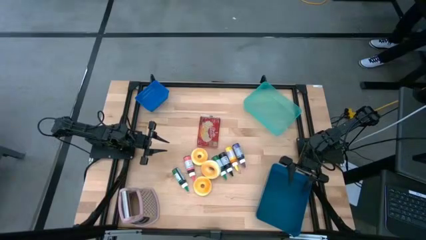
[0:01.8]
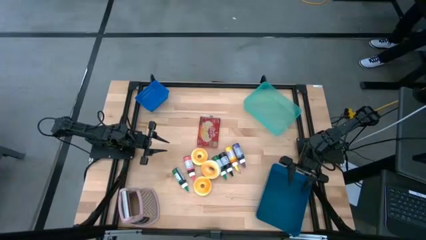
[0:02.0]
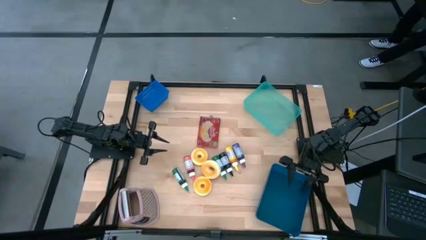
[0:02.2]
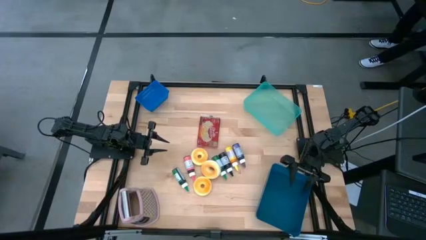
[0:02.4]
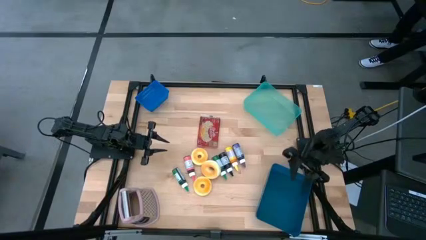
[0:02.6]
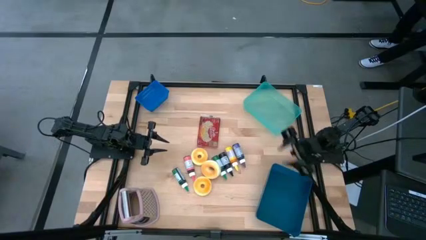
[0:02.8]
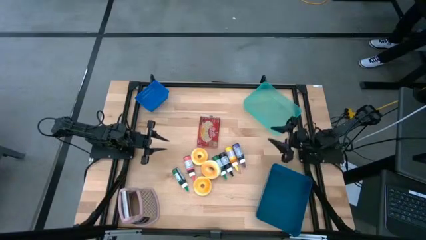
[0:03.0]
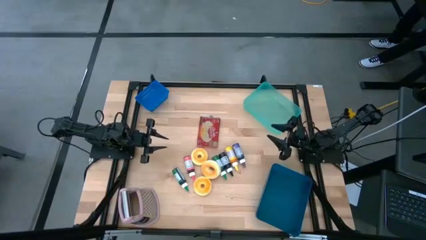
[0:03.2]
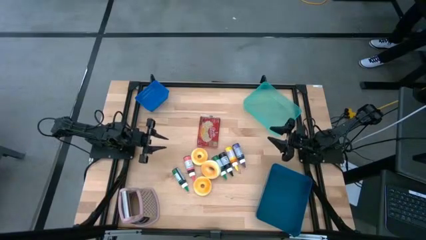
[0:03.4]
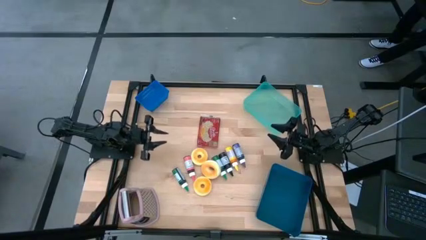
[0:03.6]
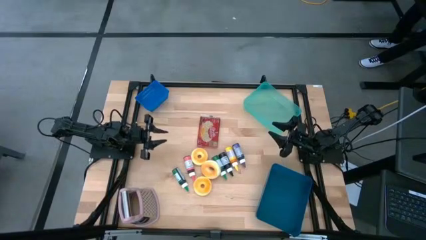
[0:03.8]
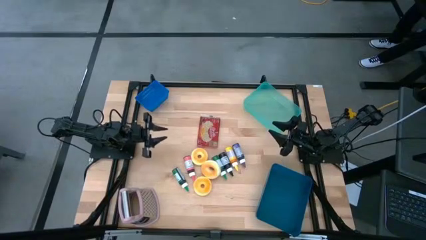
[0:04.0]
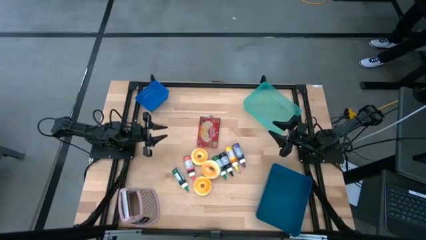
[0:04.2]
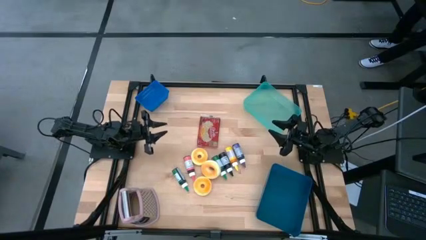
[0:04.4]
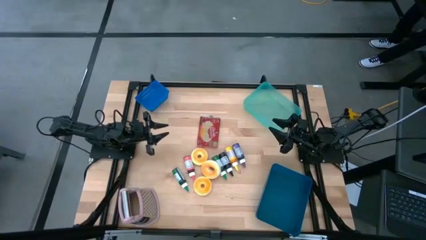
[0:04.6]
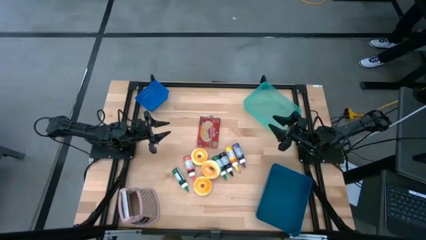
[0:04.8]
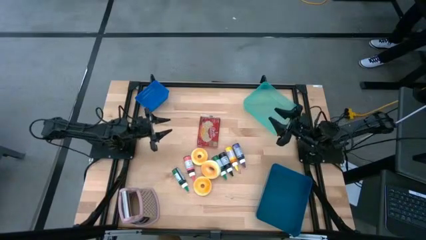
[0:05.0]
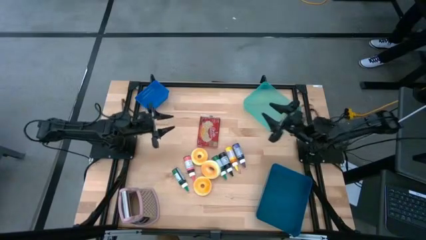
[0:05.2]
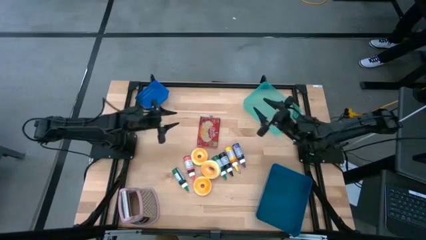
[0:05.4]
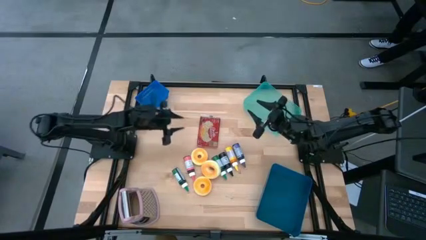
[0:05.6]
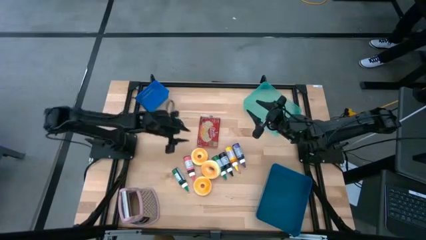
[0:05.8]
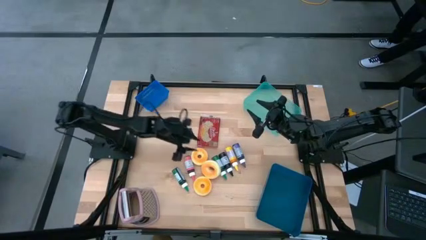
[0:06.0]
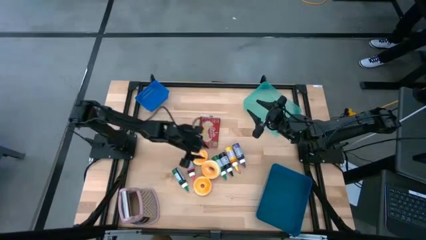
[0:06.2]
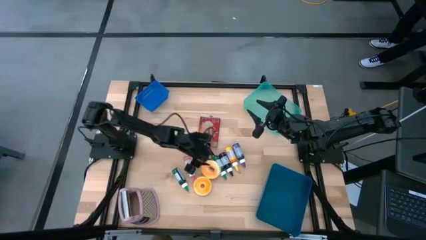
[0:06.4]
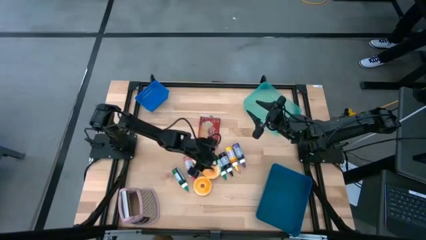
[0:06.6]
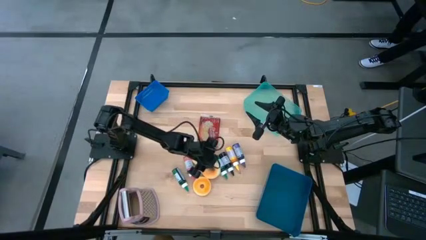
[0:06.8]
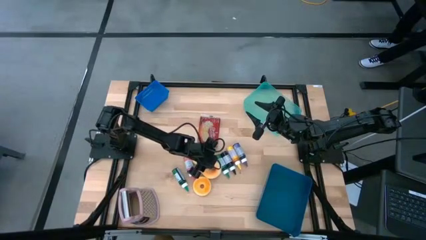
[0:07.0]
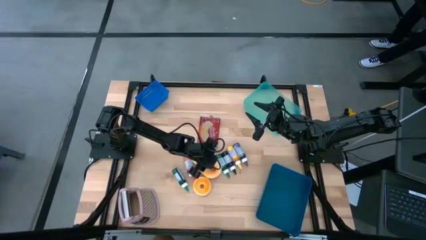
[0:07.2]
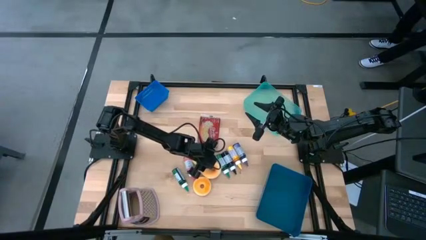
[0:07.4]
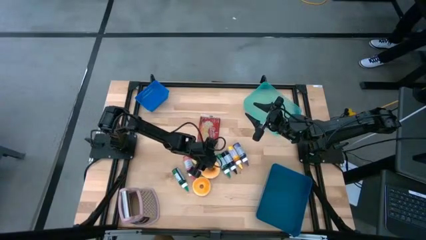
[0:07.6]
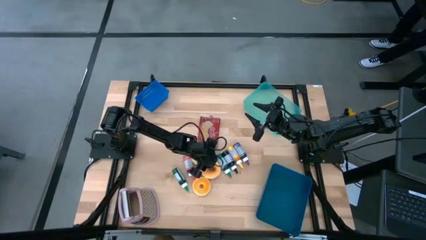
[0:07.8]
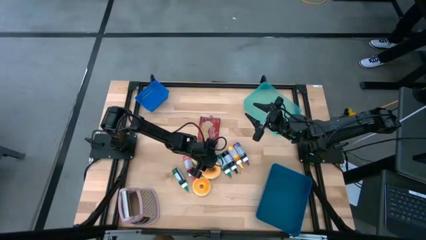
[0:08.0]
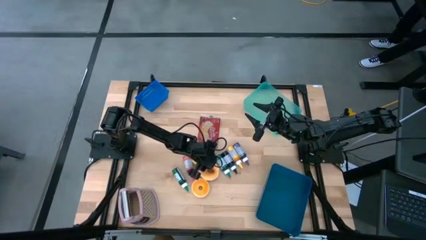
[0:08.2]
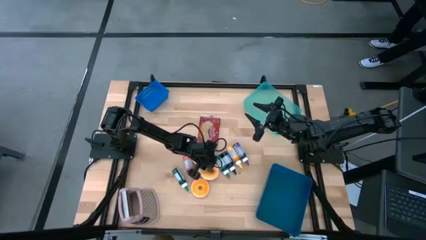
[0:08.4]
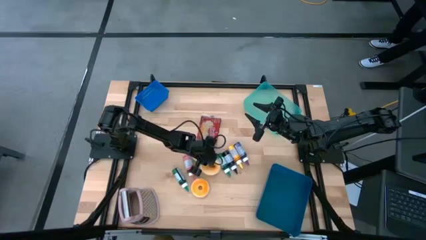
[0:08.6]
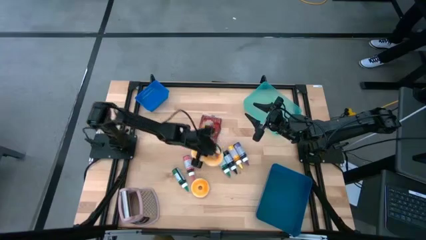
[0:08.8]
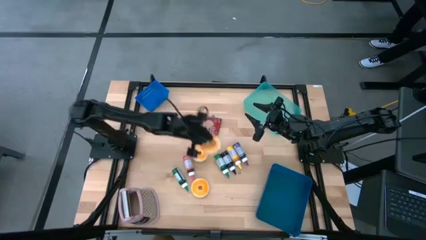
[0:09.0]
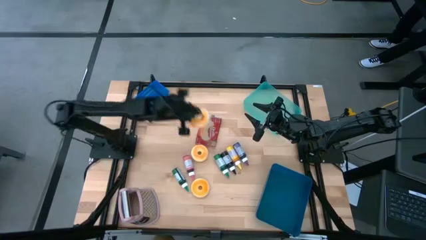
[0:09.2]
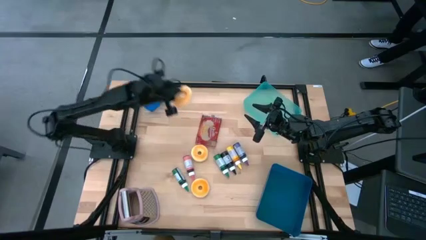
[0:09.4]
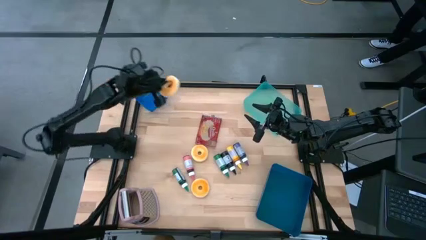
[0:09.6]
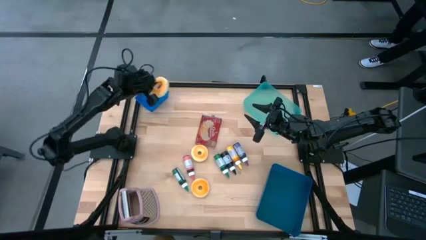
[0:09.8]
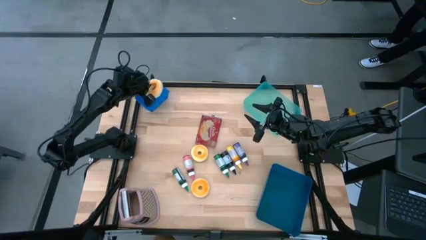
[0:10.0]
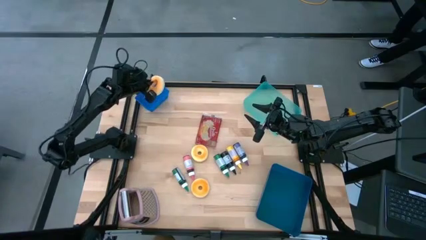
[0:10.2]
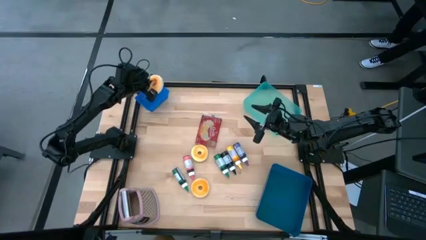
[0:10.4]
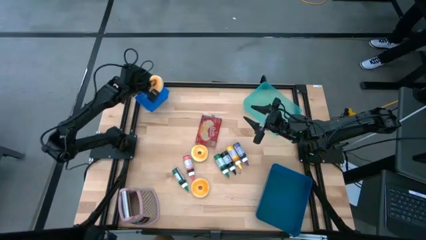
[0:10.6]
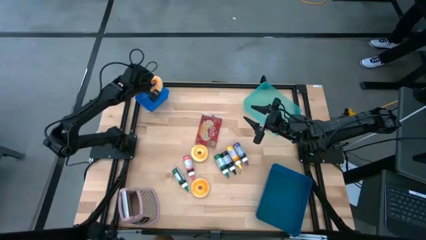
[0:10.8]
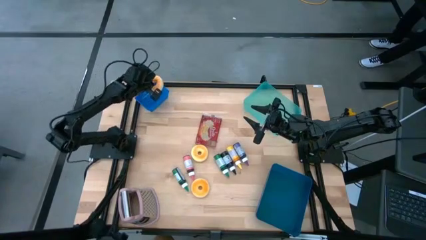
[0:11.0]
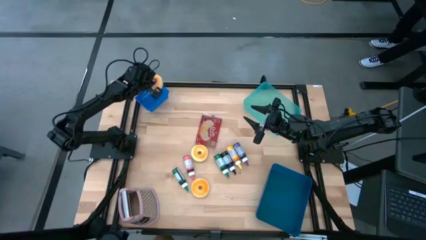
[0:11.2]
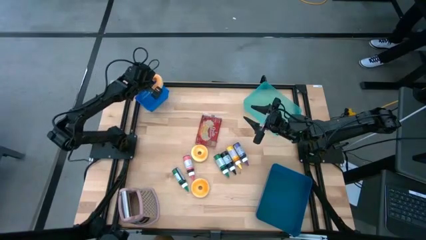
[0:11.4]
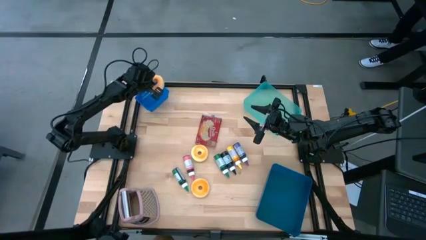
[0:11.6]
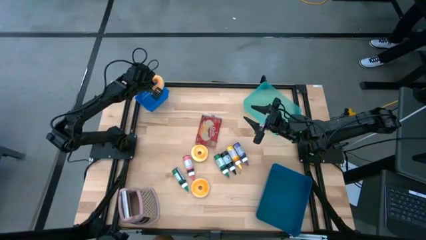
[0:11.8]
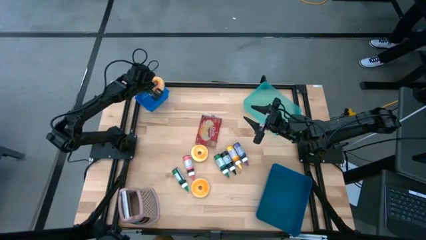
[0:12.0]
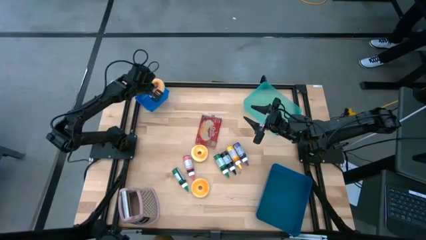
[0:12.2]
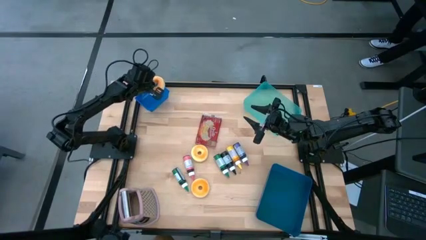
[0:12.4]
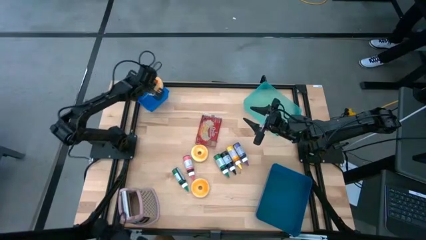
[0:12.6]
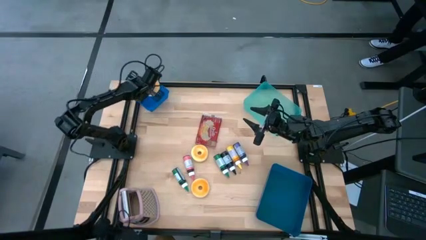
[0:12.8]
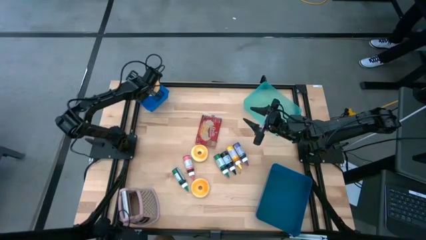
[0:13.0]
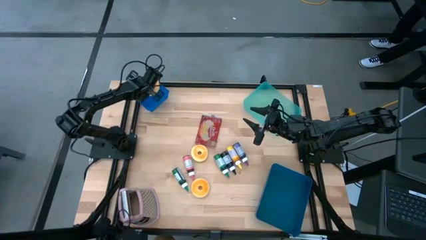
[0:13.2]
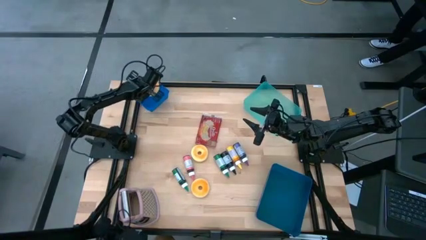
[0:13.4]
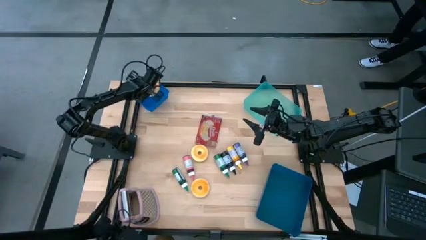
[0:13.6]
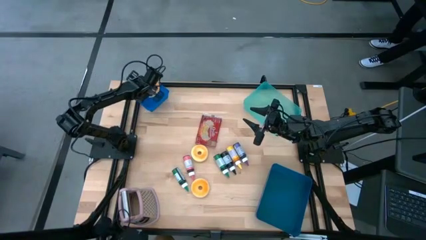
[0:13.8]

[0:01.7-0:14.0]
Put the middle yellow donut into the top blue bin

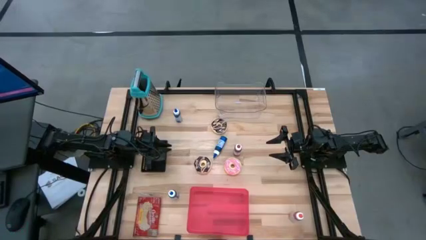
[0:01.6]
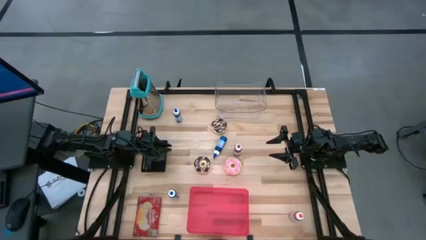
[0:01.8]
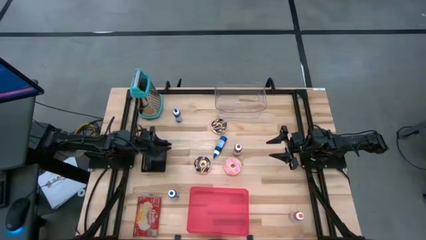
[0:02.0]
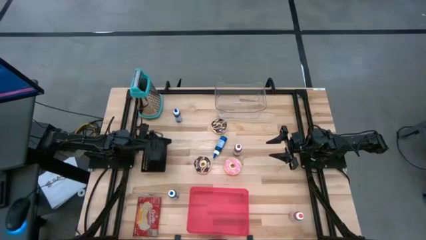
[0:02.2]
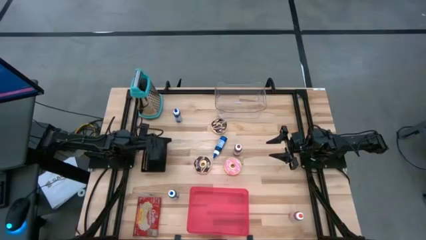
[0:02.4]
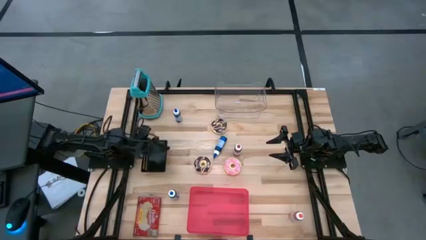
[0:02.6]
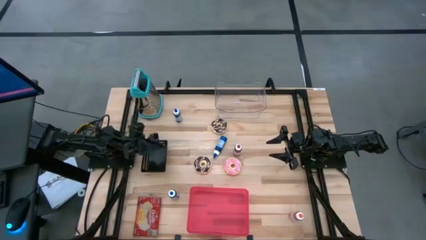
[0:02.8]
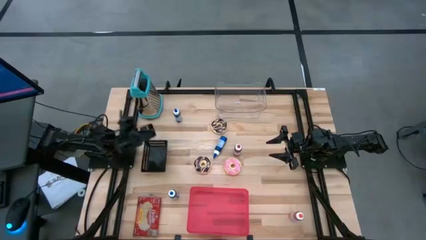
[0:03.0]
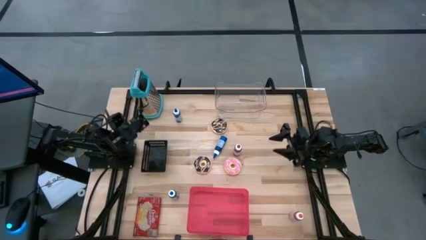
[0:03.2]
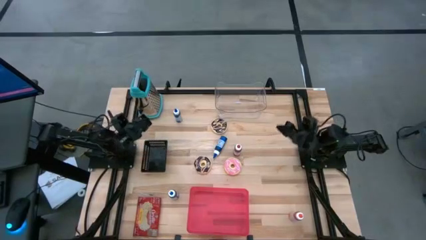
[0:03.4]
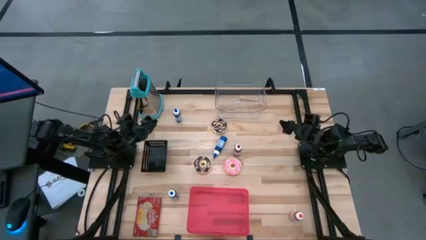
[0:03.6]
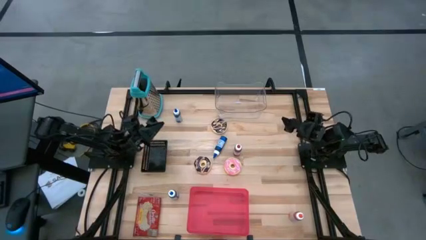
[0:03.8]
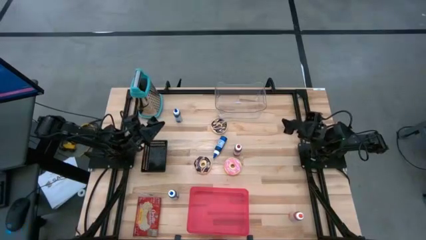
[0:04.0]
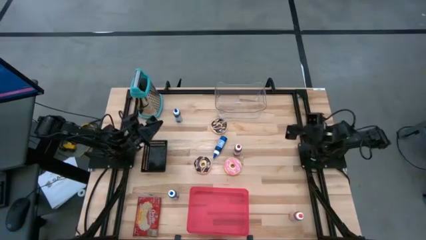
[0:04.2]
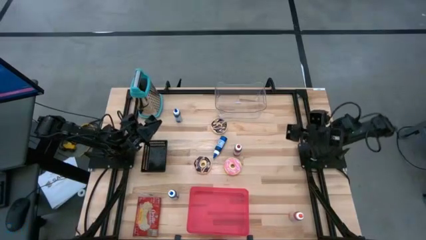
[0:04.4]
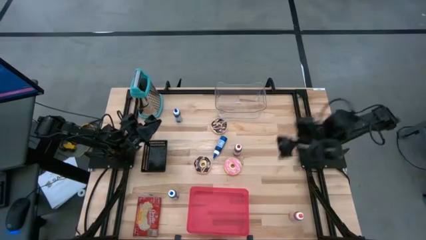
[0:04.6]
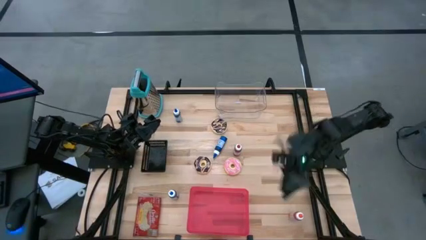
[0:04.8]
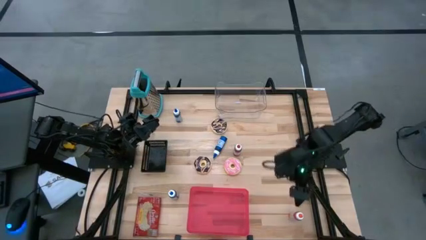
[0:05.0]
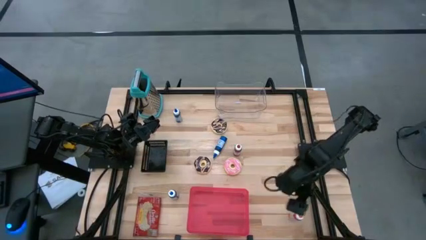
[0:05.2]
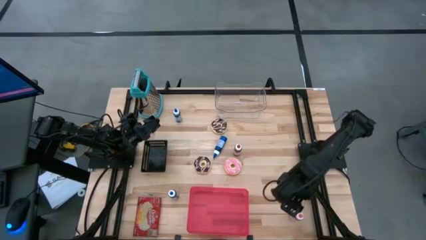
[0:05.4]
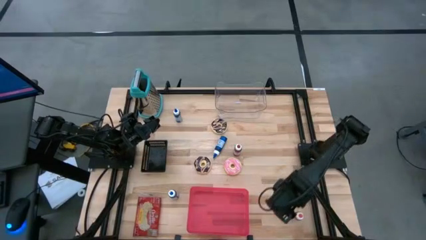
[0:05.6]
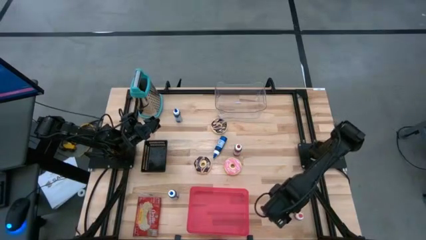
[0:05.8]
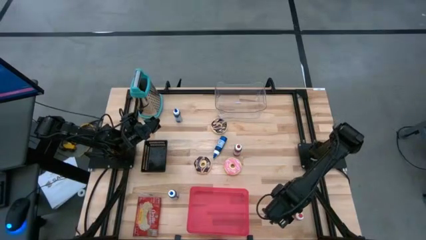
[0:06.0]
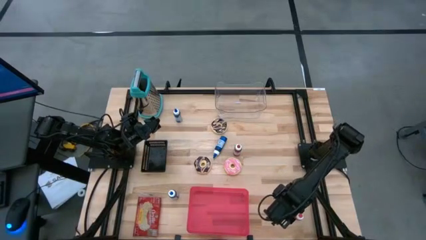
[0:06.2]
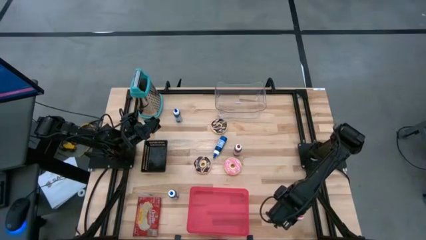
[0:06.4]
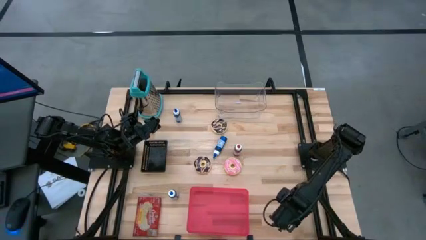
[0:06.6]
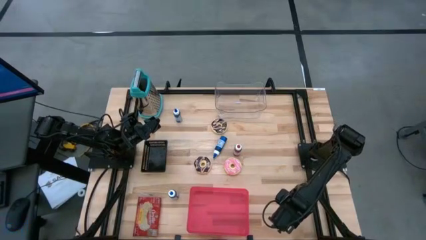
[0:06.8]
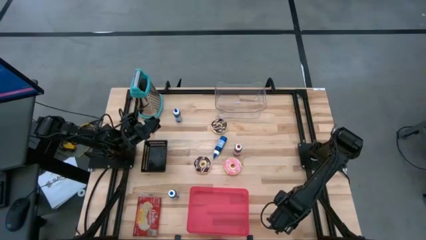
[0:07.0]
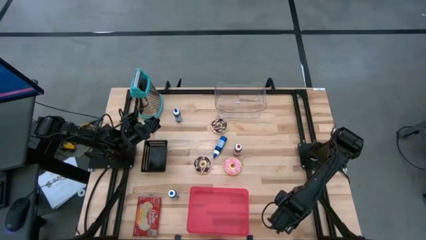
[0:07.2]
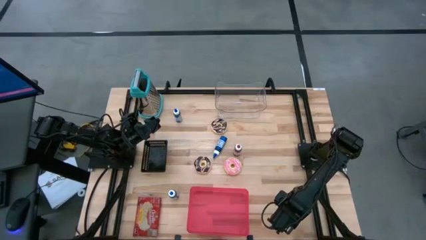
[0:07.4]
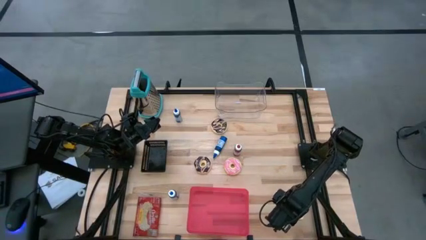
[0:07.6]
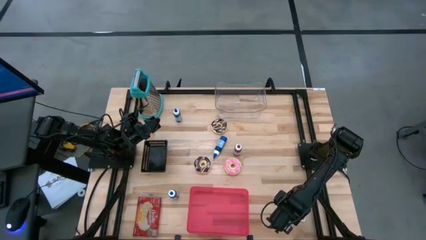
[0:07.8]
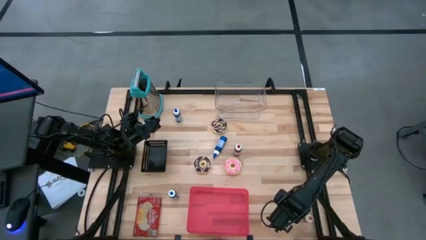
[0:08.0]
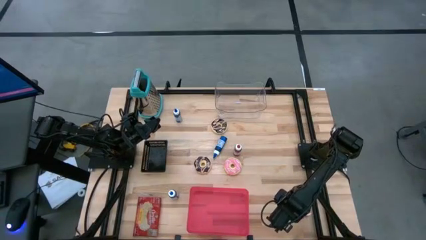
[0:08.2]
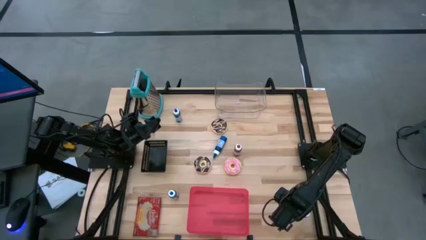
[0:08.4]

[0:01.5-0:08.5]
Put the orange food coloring bottle into the transparent bin
